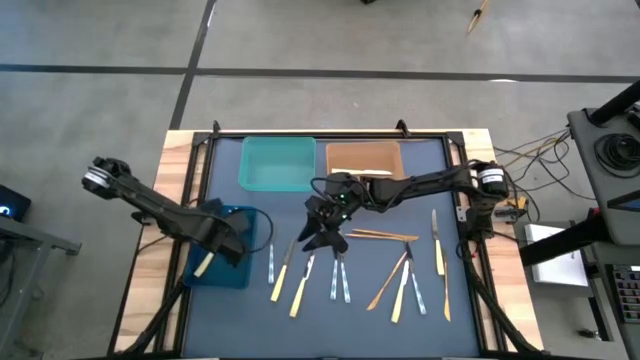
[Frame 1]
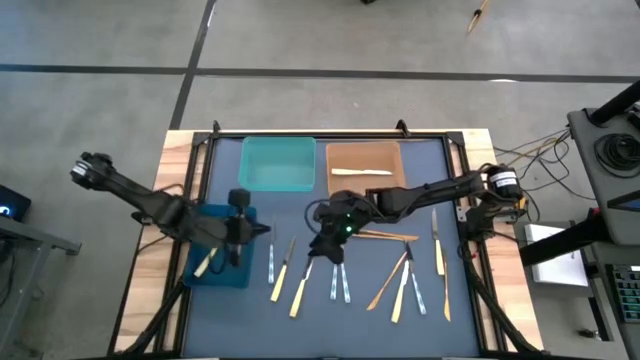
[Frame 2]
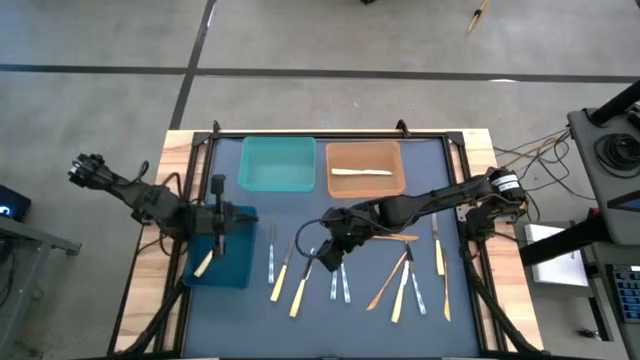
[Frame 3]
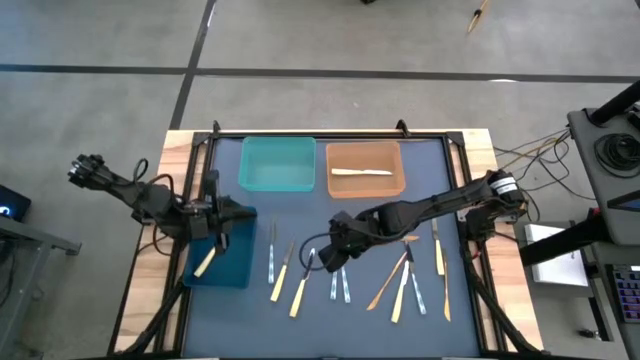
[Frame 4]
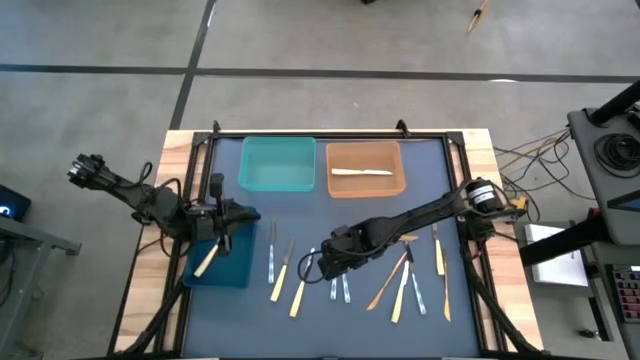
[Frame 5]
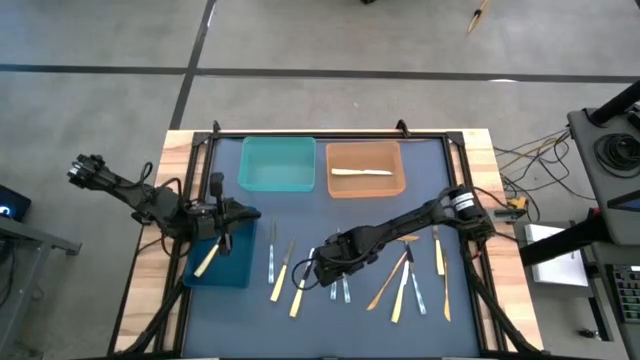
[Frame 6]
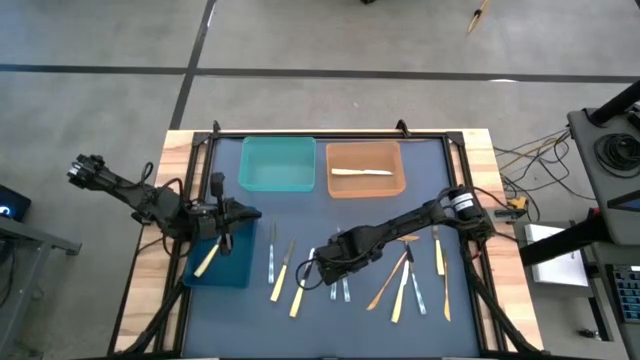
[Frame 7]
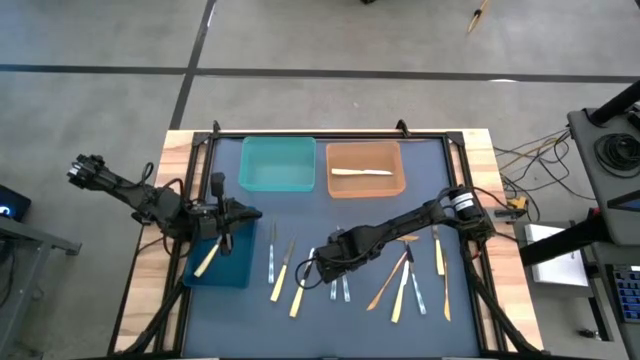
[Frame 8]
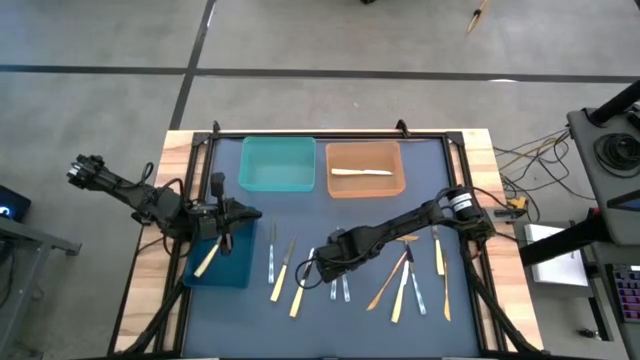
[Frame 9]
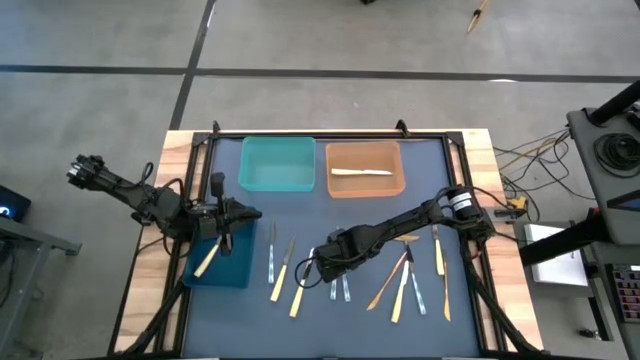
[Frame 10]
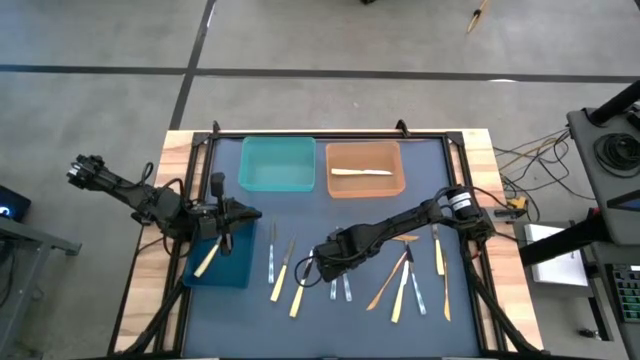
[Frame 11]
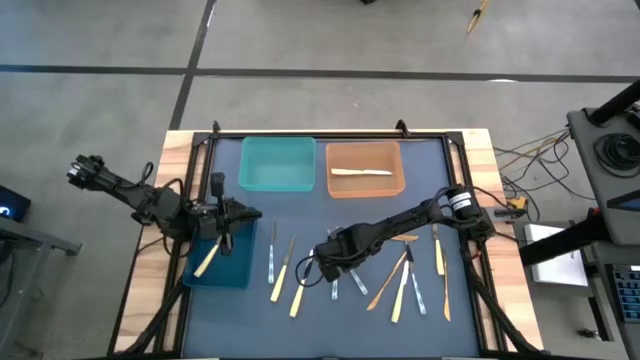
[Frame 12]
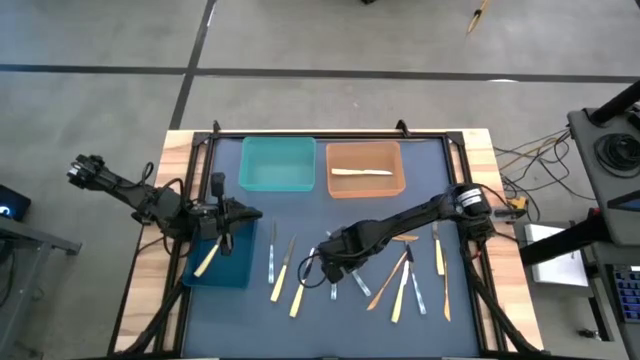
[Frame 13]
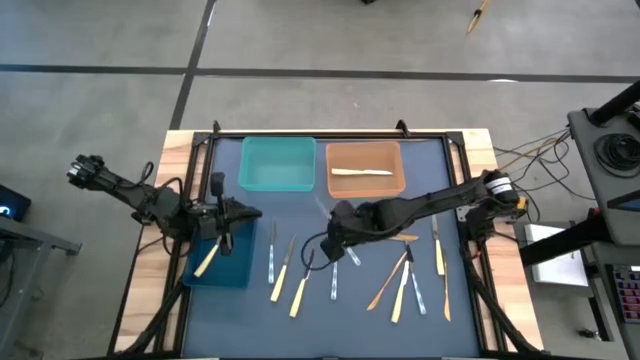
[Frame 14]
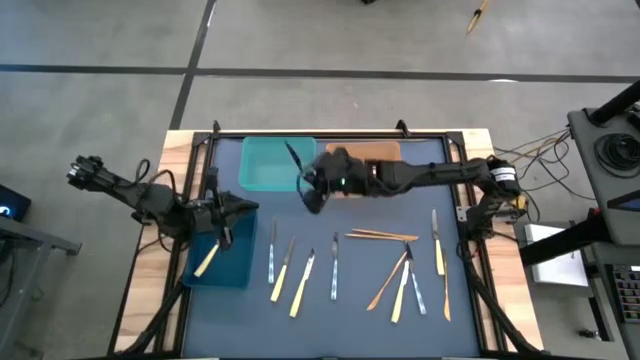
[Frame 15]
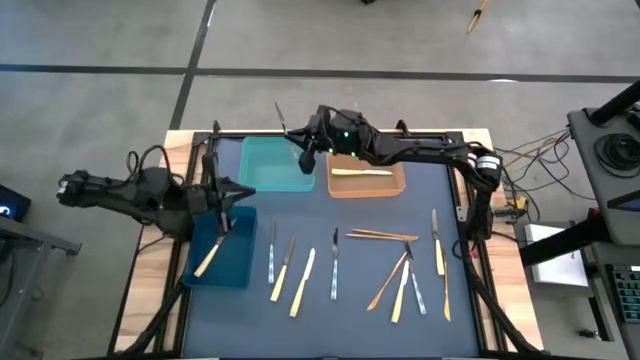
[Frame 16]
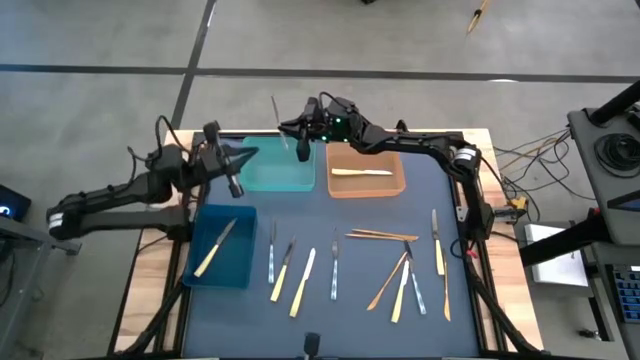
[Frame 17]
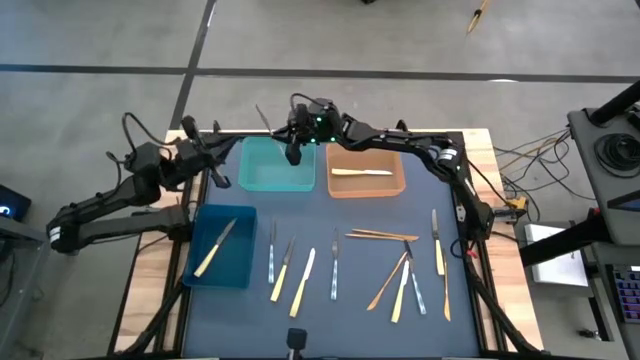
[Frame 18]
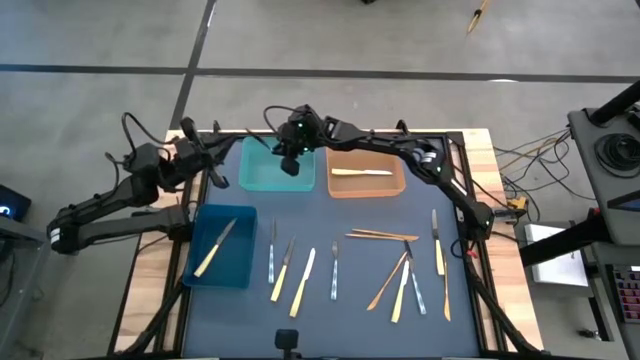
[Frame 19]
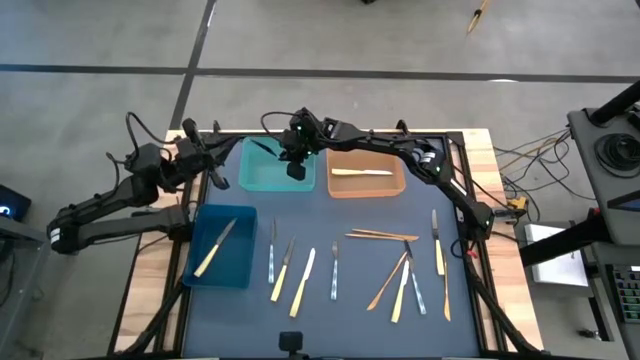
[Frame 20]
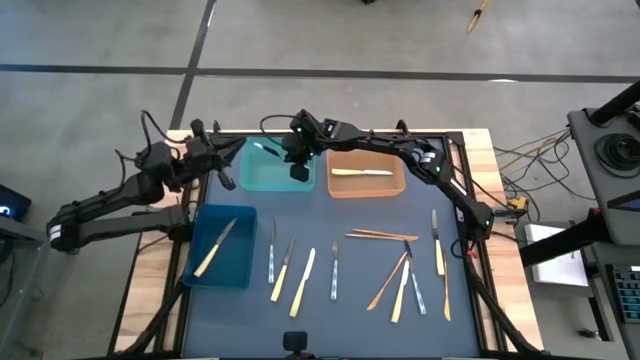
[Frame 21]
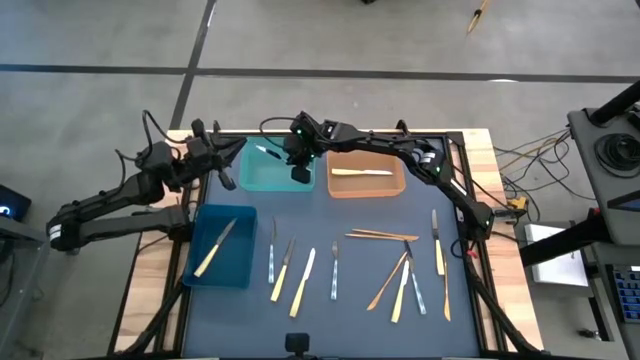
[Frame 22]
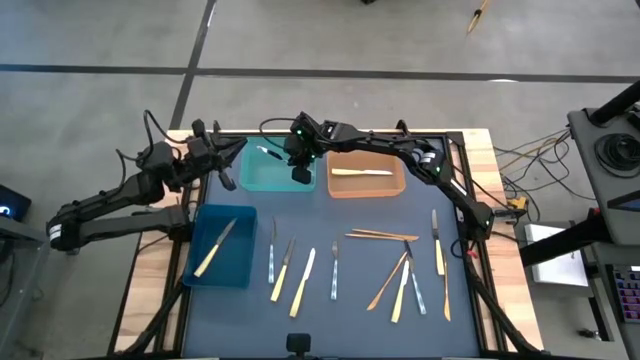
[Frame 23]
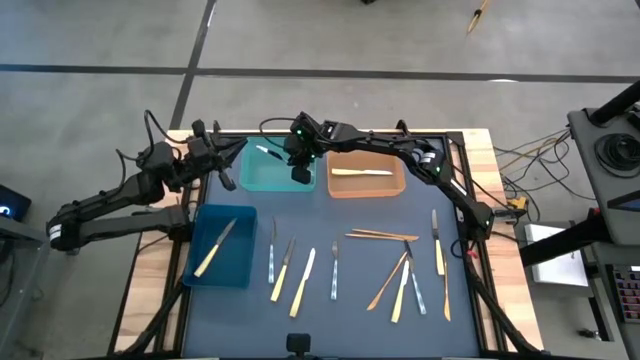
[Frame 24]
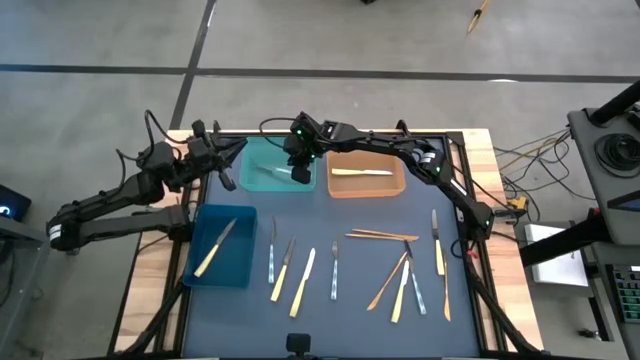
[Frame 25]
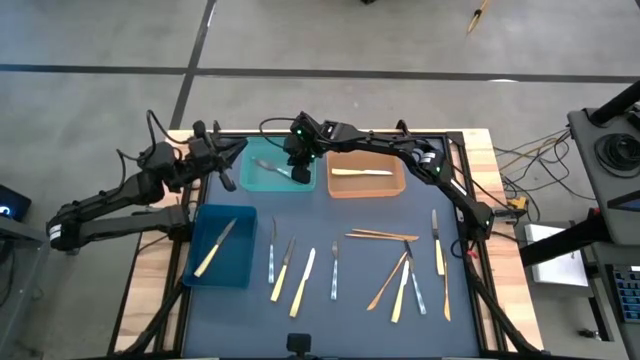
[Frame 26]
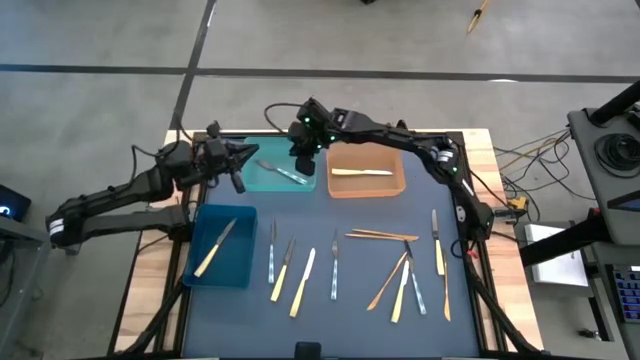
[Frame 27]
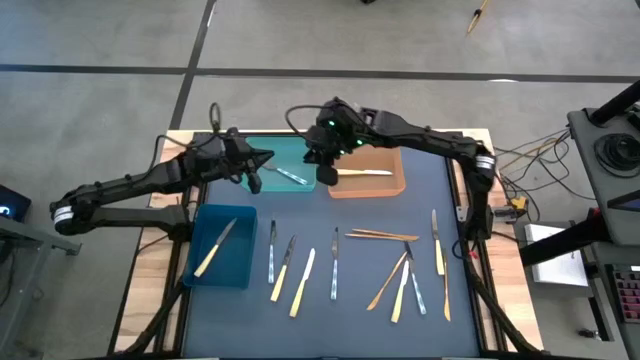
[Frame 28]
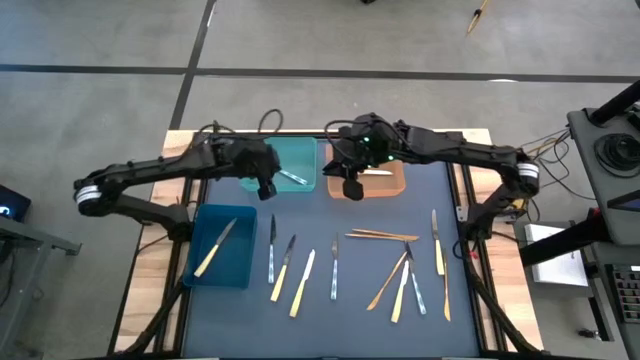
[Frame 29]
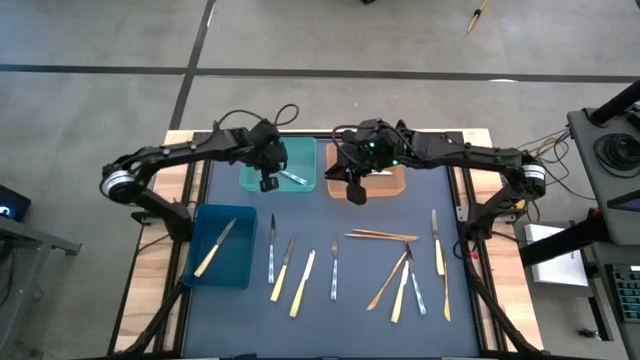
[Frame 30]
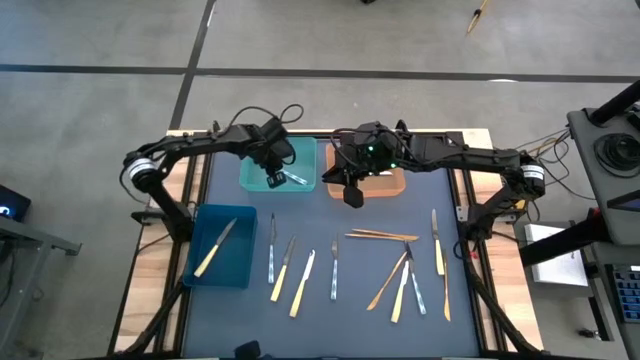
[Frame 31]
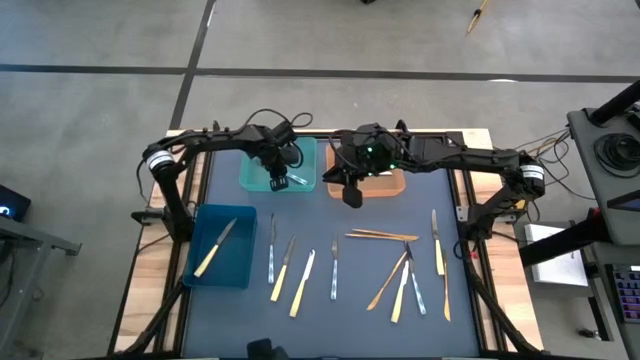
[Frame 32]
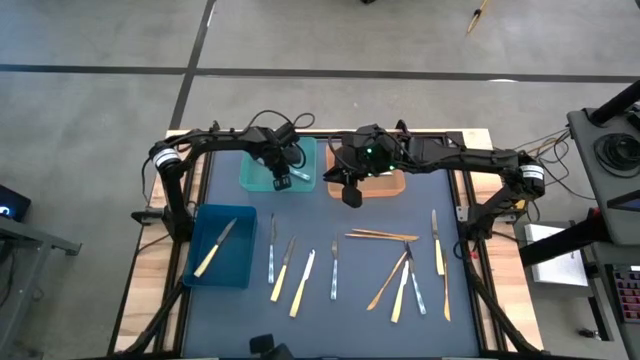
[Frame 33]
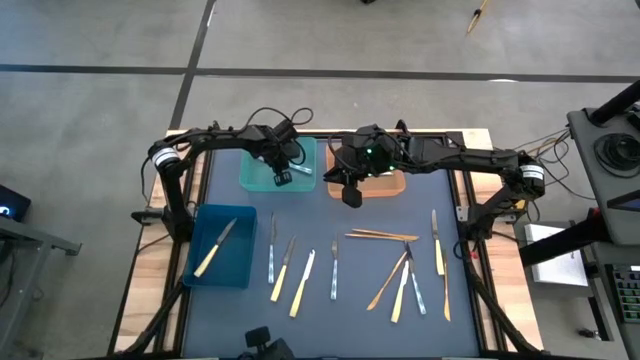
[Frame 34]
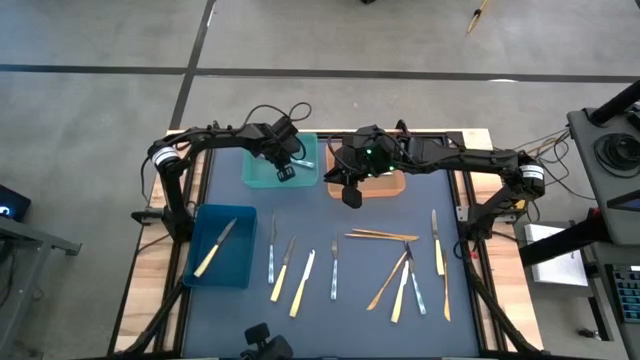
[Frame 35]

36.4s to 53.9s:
Task: Sort silverware by color (type)
Put the white knife into the light blue bin

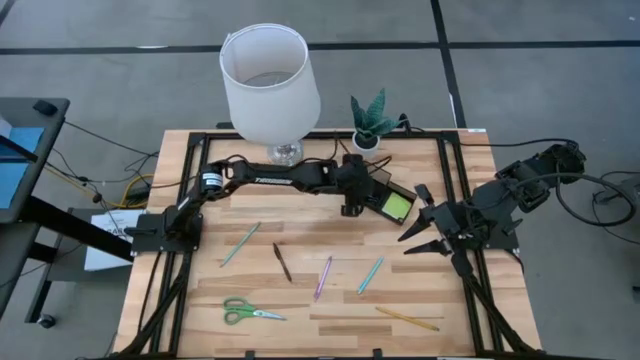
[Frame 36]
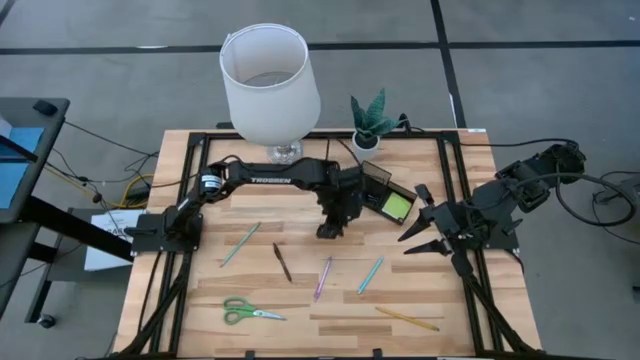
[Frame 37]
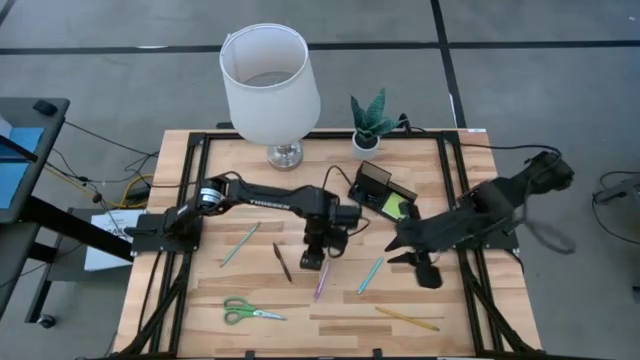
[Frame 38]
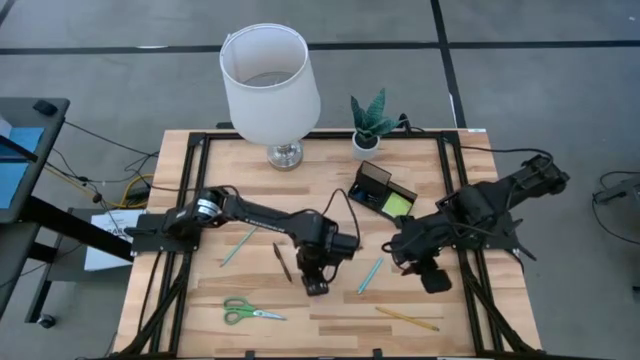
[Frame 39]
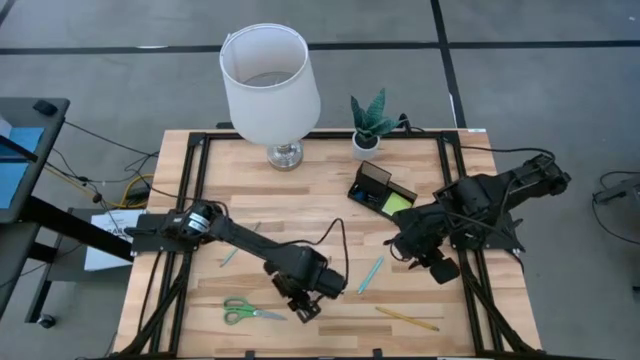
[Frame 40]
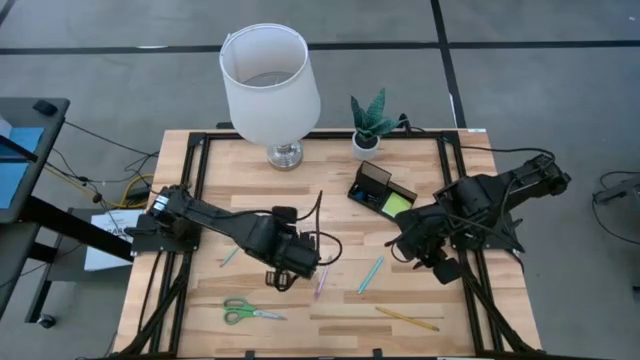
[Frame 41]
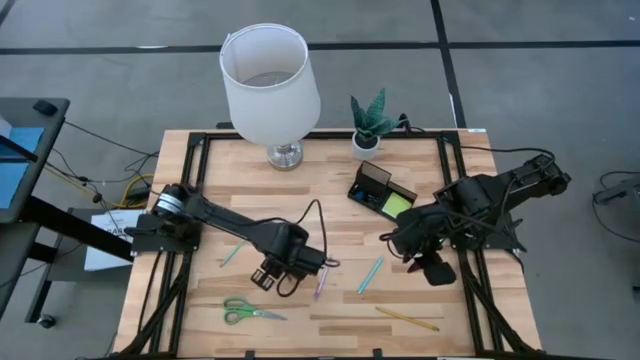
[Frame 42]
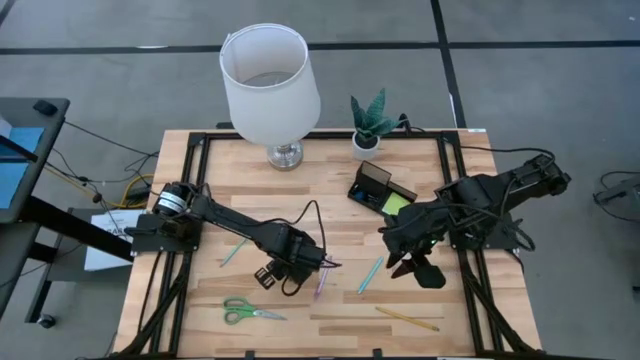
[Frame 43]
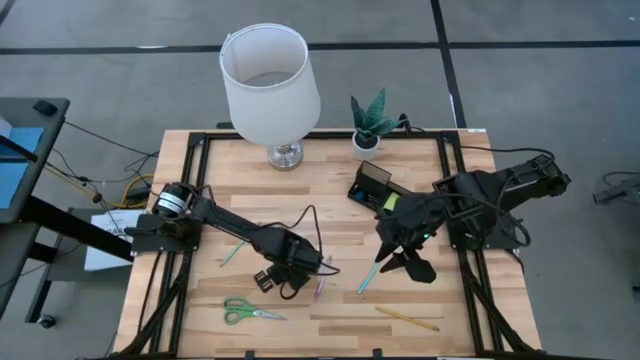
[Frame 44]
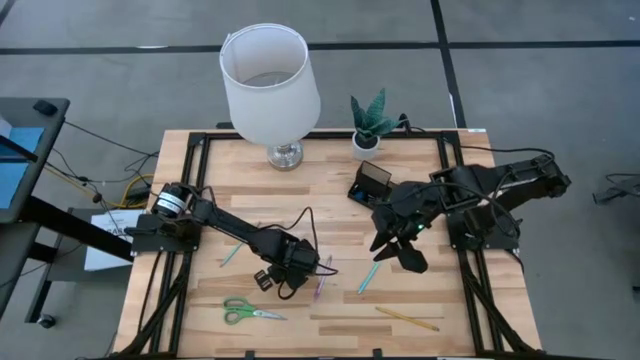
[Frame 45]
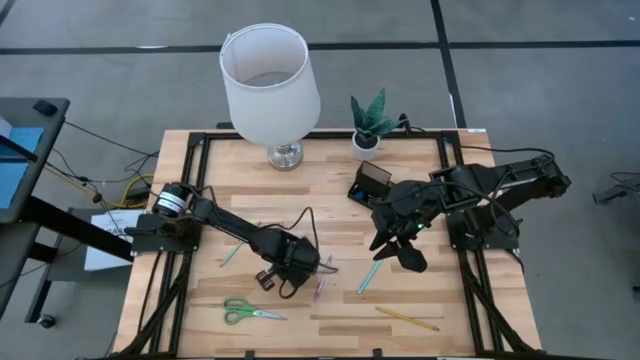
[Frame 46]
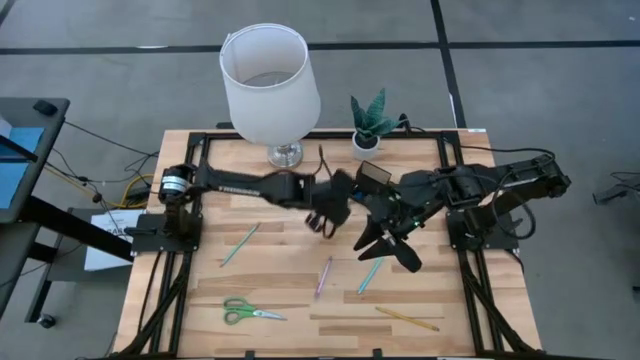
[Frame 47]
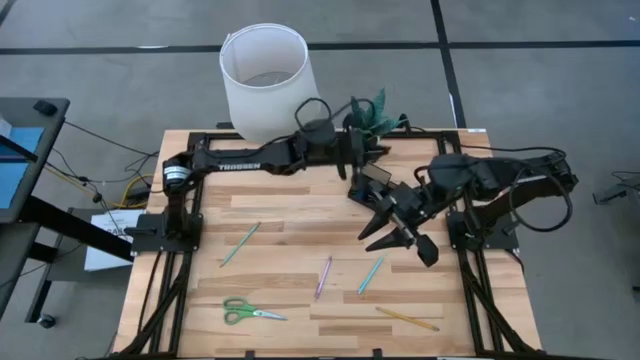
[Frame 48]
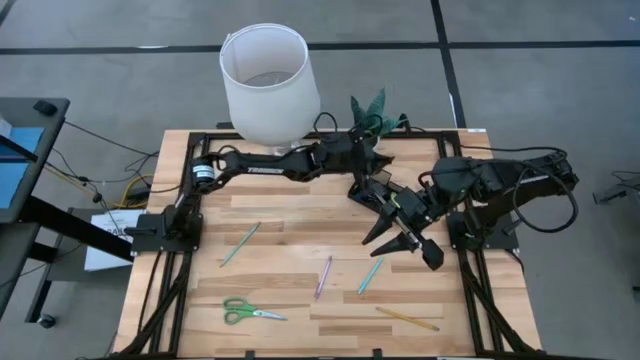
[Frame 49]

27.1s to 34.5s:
Task: Pick and place office supplies into organizer
Put the brown pen into the black organizer
